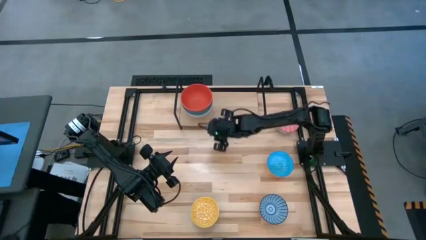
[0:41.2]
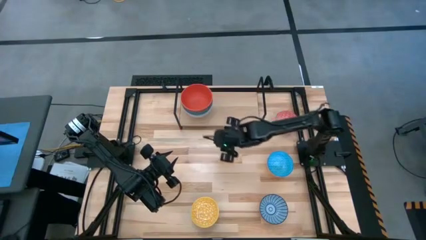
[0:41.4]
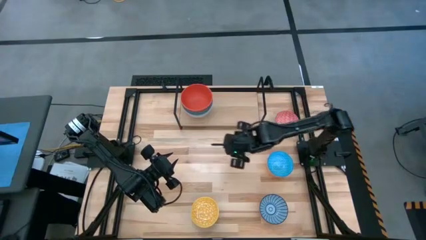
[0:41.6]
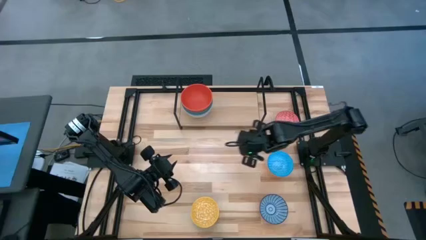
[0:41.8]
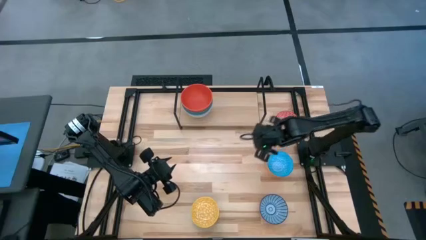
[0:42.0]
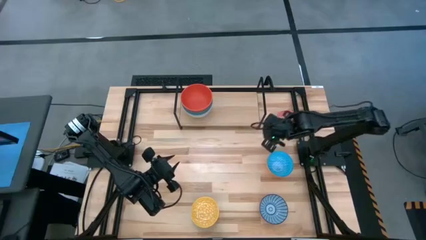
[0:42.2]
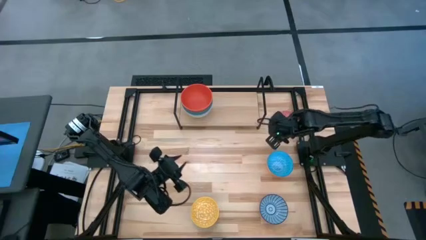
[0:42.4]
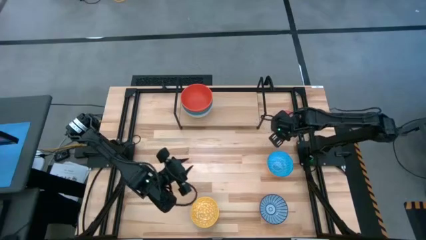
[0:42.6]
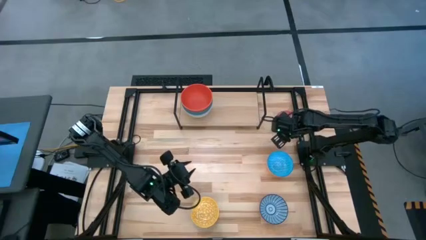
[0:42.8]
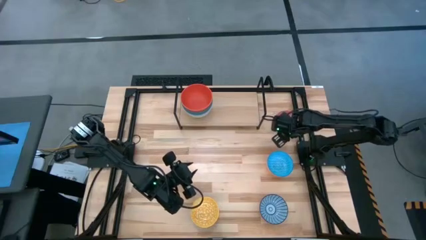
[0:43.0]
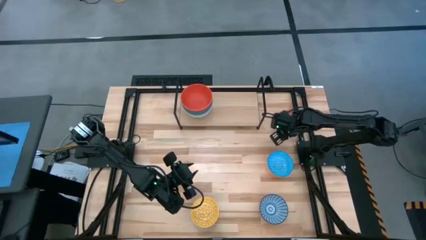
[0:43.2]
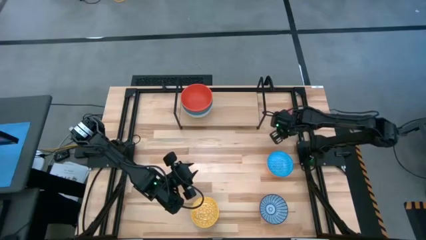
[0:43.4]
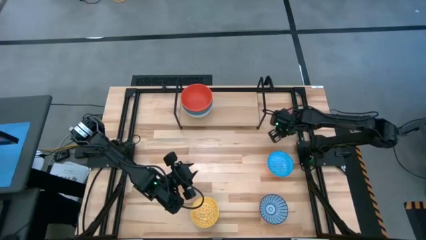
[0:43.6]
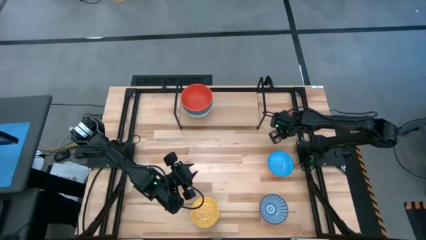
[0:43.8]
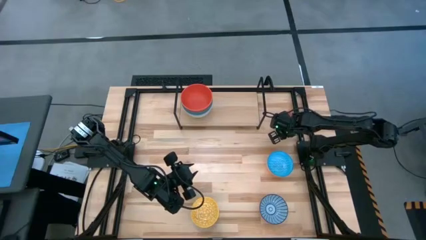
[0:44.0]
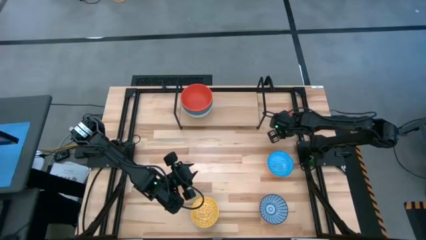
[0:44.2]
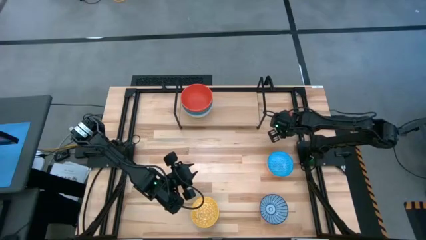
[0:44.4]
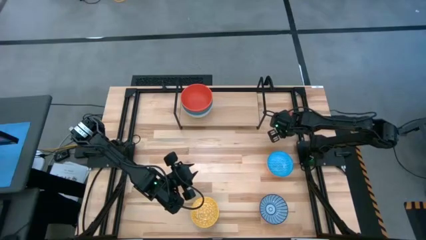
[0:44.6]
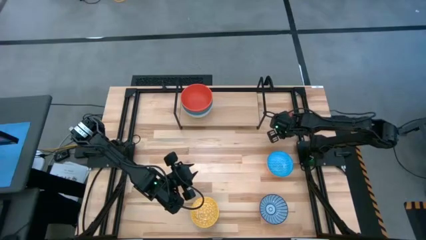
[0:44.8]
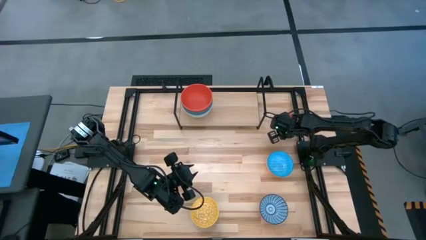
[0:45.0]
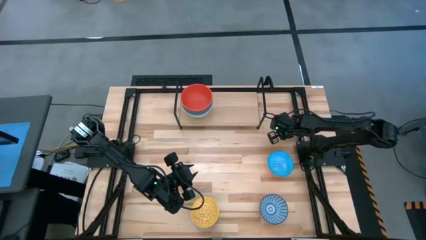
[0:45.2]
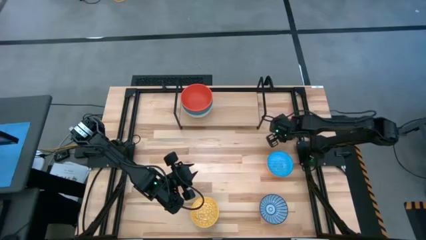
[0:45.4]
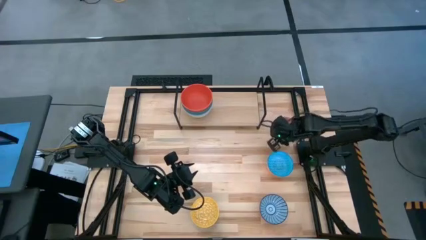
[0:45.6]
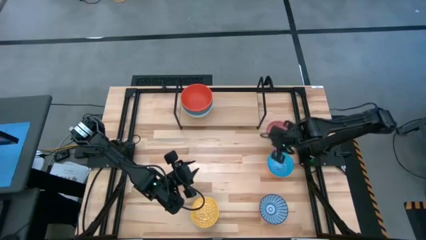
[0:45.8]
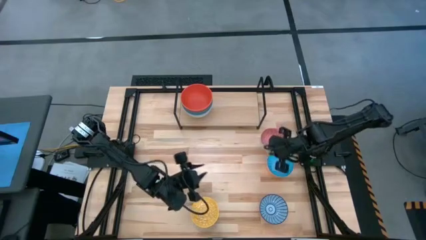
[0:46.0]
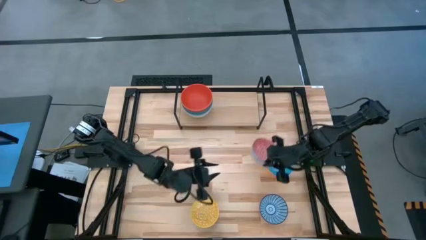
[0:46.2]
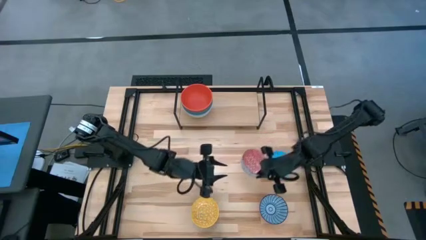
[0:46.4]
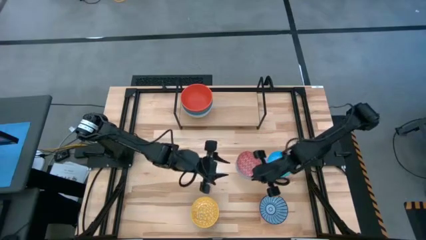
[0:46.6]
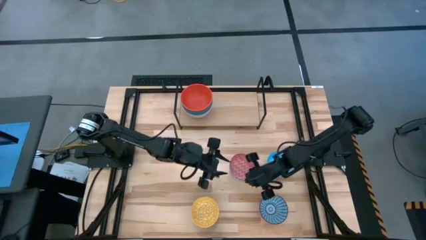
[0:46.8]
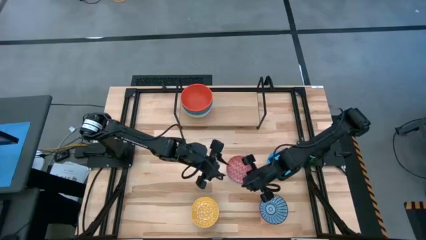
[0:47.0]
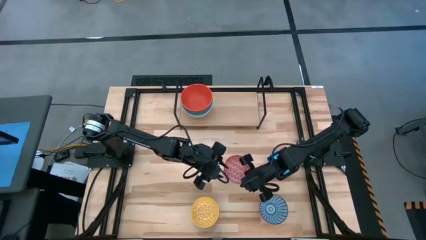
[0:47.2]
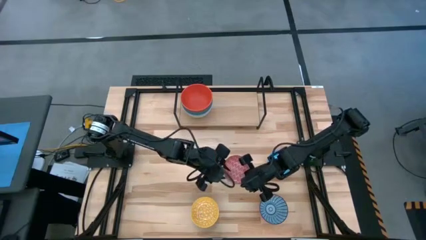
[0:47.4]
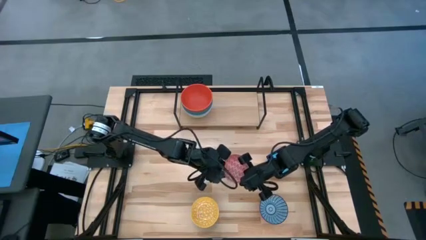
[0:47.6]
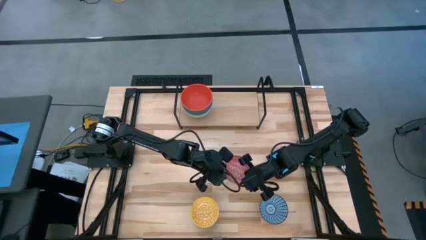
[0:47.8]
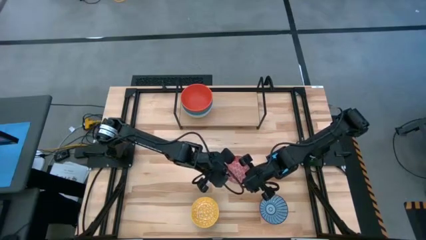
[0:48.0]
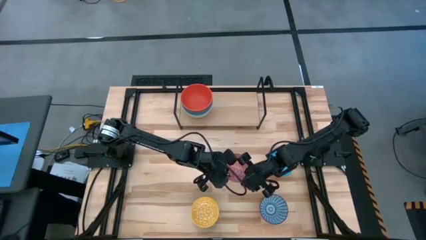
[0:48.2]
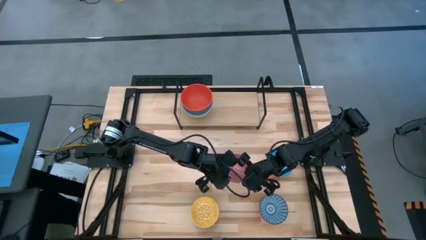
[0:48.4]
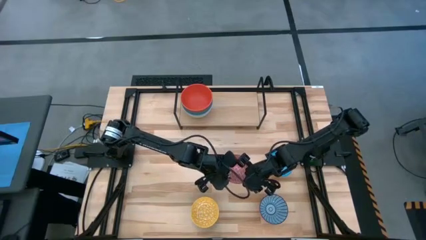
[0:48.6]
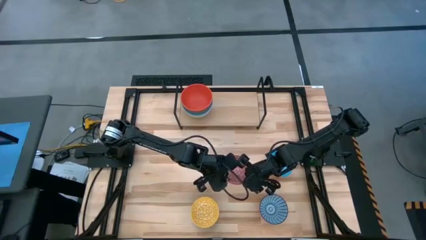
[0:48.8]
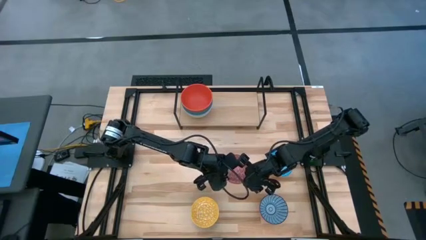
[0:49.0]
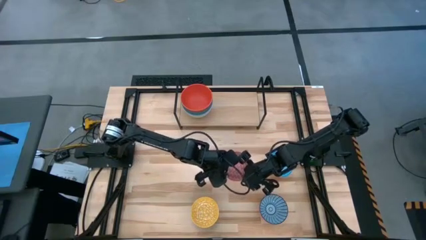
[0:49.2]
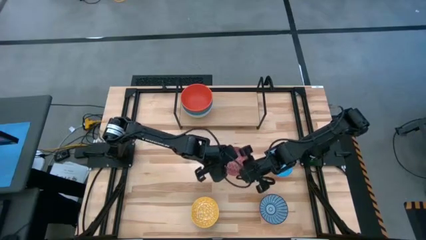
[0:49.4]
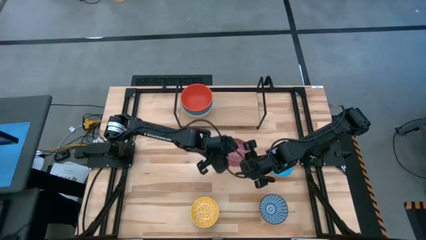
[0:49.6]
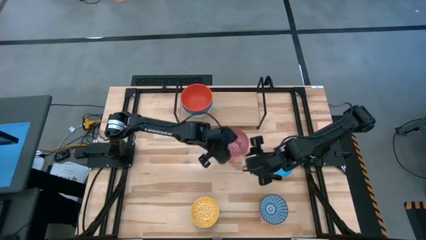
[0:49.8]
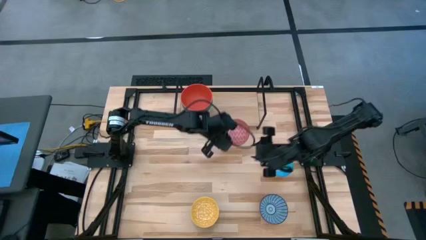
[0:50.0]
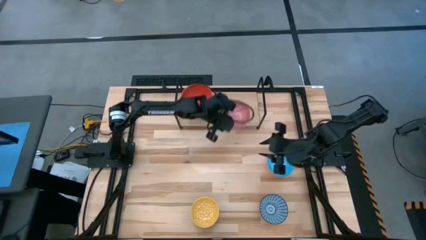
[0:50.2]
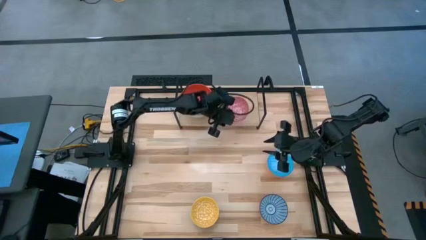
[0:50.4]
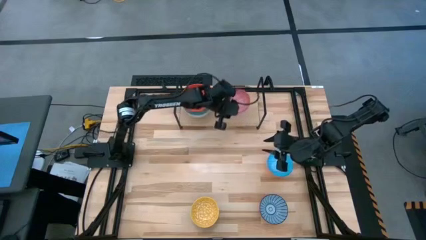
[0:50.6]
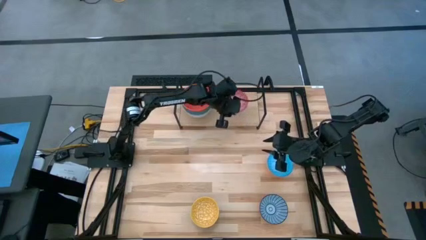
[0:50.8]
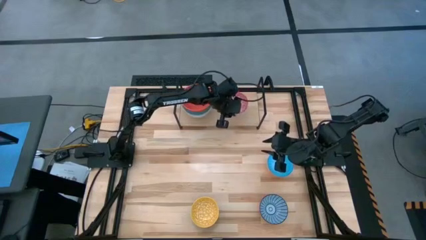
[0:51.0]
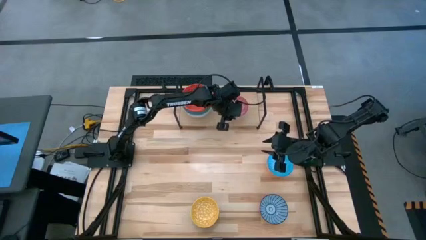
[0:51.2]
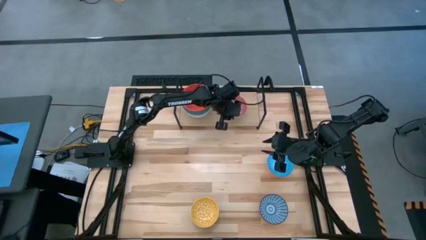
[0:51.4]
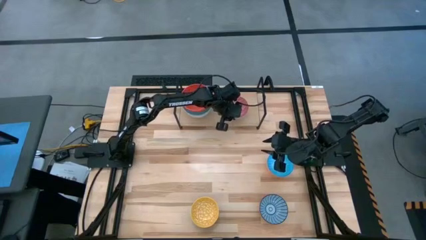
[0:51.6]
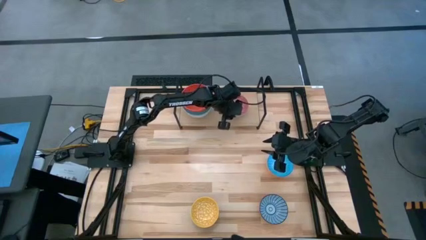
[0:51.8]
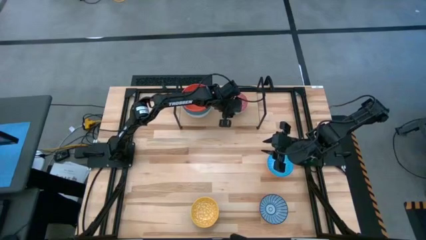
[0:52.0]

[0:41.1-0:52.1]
Task: Place and stack bowls onto a shelf
Put the red pattern bowl on the shelf

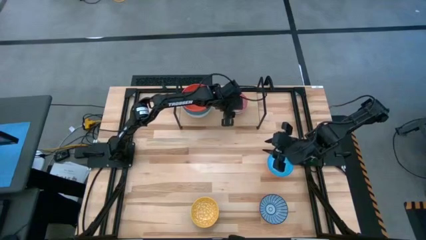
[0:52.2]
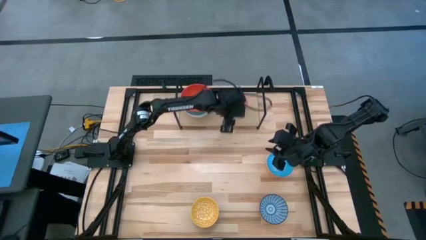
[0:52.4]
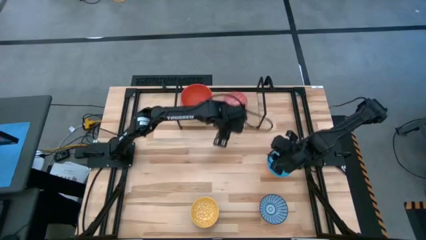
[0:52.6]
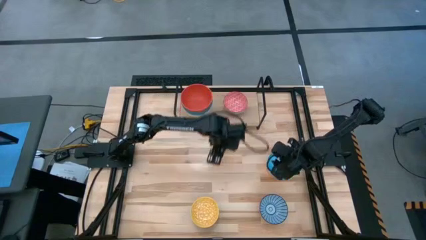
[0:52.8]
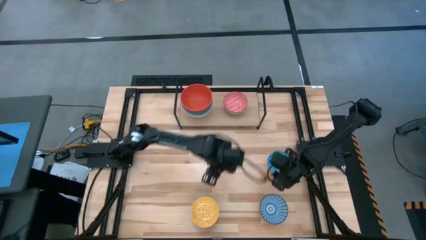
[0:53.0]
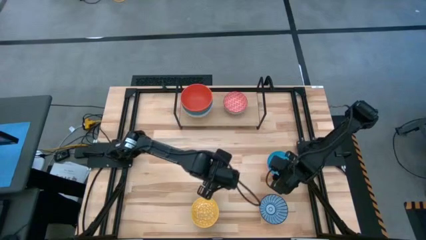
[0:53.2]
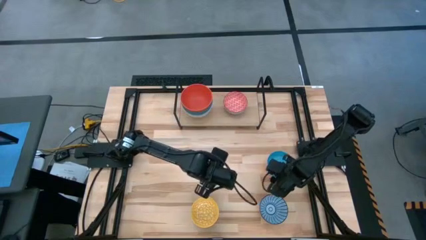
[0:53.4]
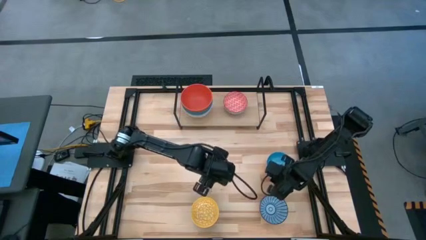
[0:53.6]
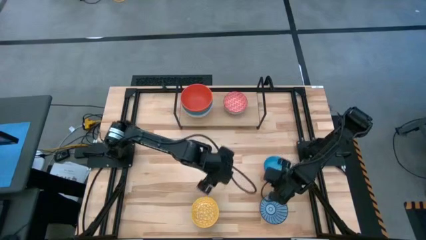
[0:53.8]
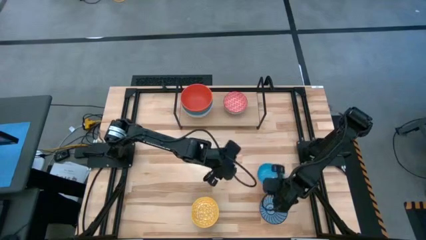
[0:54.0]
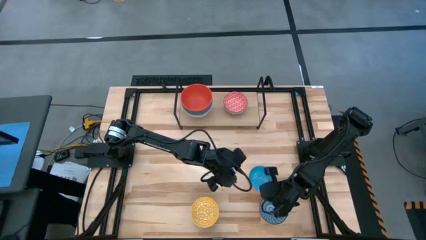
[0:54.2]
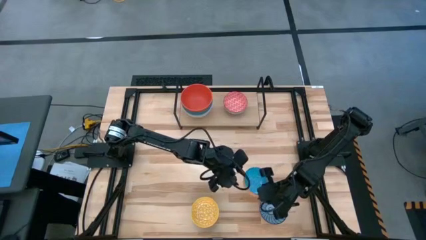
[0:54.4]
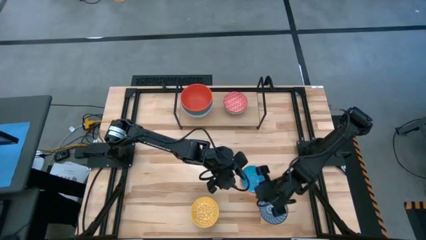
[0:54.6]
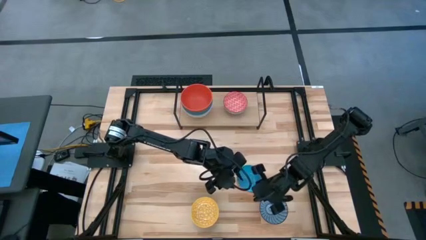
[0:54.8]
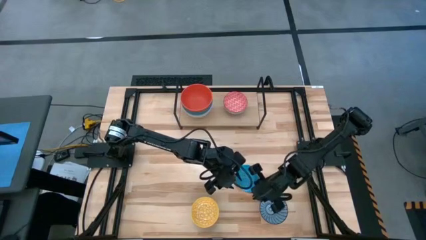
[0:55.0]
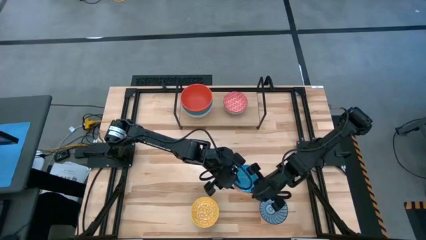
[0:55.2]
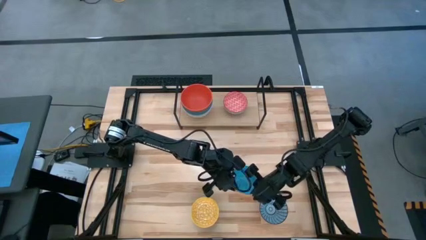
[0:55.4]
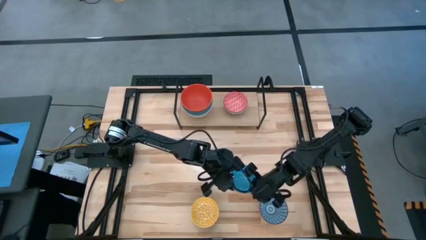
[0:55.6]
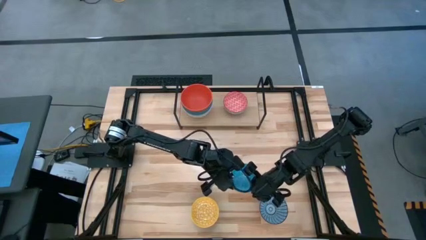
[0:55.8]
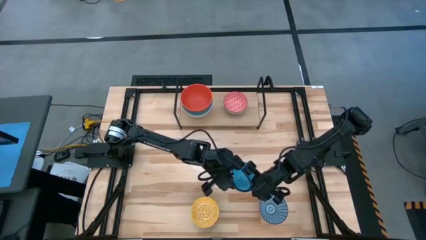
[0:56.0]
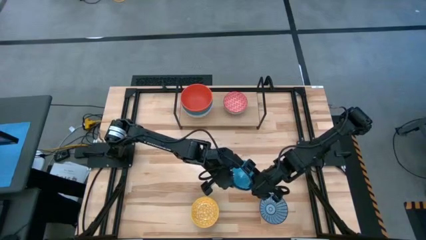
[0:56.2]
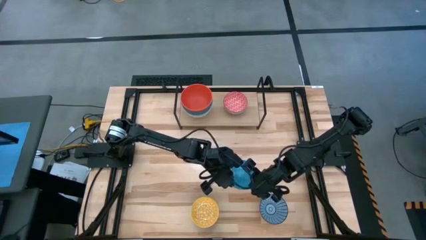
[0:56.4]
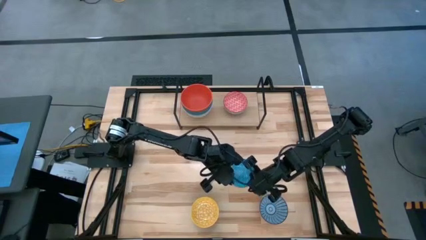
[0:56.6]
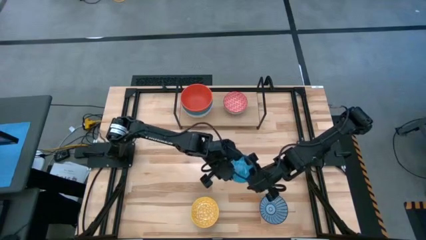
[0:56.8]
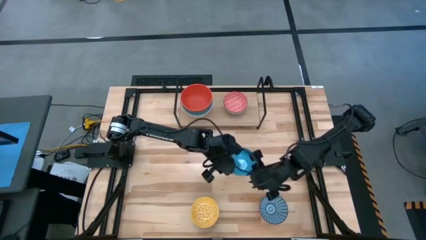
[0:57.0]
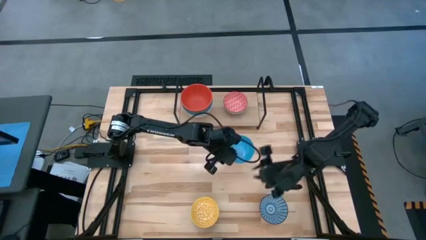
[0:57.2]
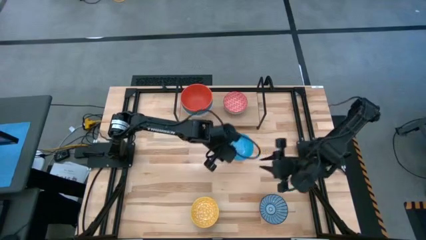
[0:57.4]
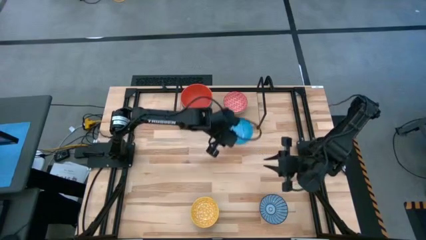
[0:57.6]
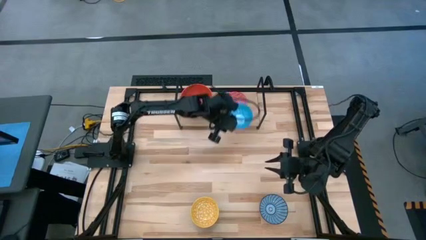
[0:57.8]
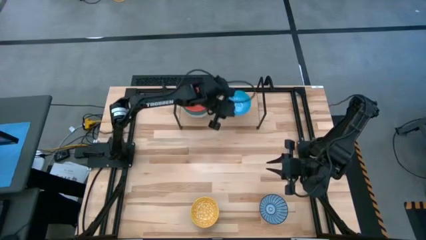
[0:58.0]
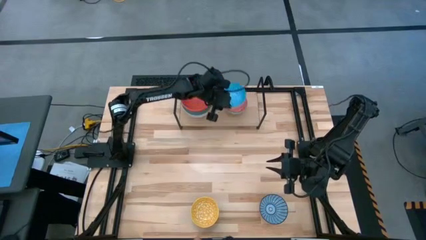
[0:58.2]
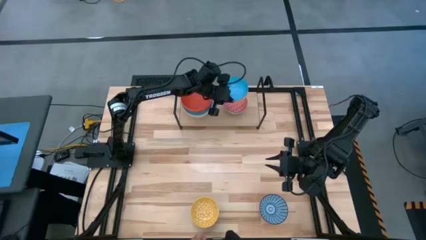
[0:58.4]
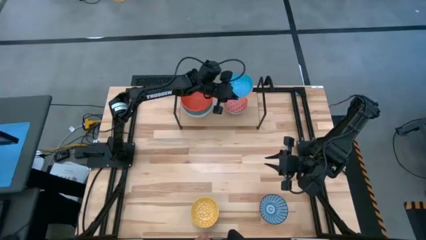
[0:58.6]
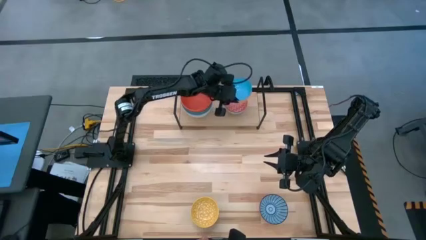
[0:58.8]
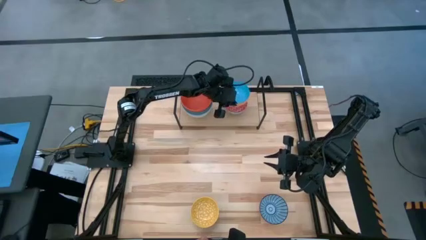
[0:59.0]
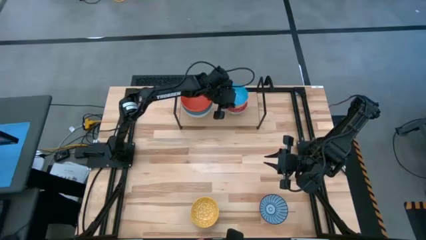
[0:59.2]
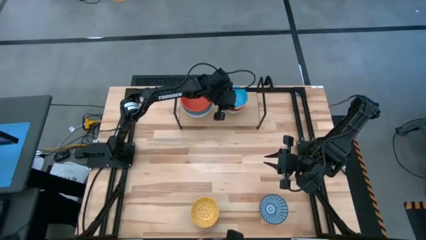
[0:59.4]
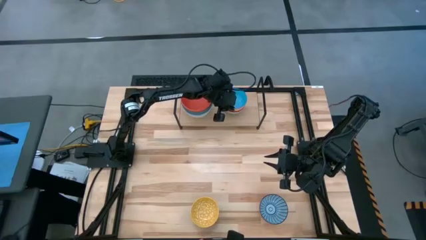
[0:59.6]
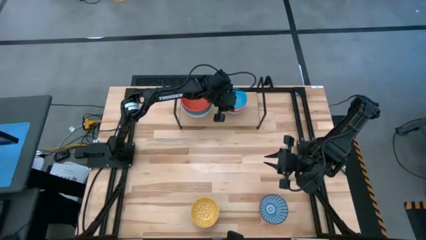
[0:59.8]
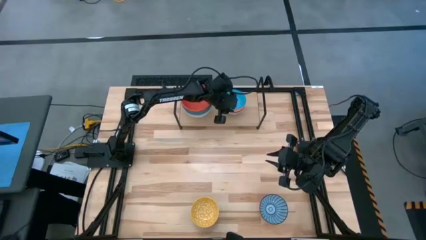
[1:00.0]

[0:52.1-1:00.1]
Stack the light blue pattern bowl on top of the red pattern bowl on the shelf
